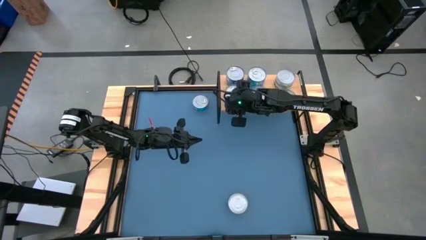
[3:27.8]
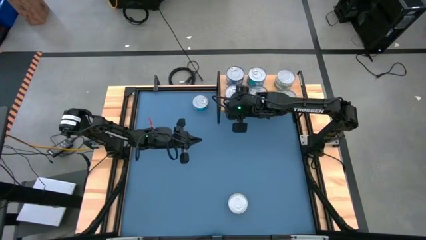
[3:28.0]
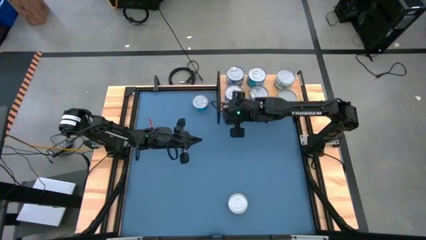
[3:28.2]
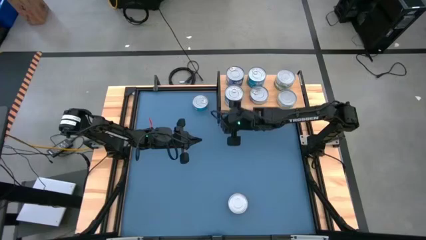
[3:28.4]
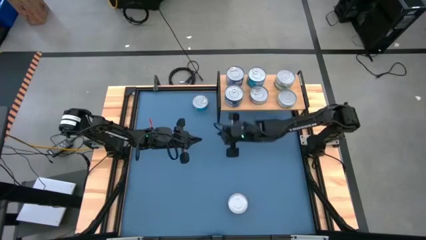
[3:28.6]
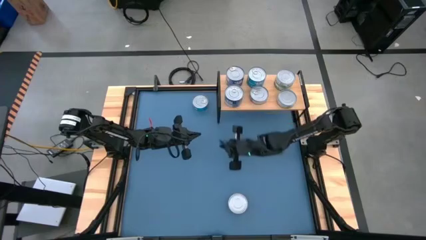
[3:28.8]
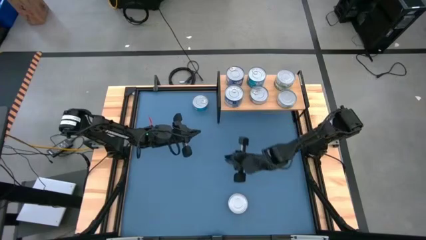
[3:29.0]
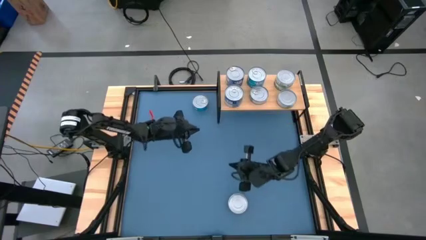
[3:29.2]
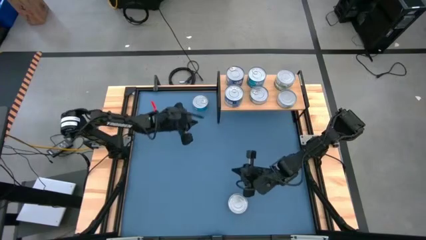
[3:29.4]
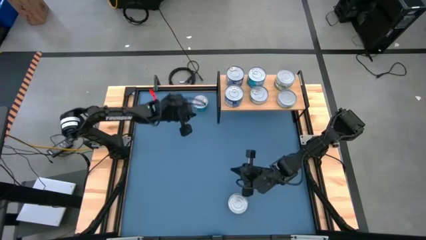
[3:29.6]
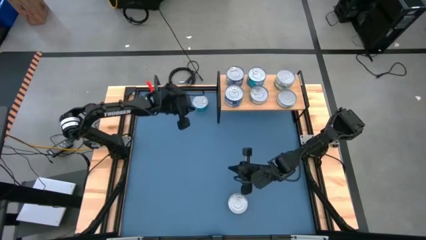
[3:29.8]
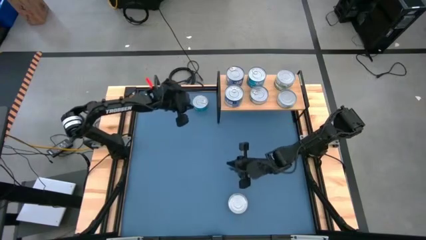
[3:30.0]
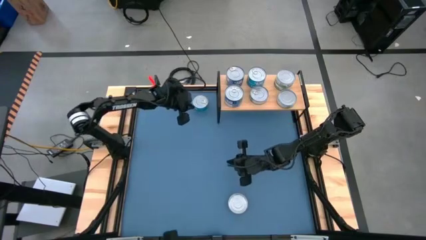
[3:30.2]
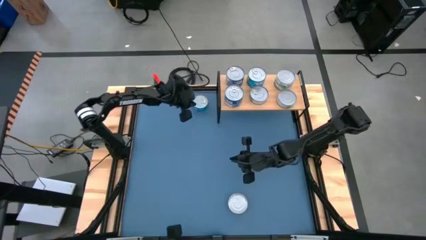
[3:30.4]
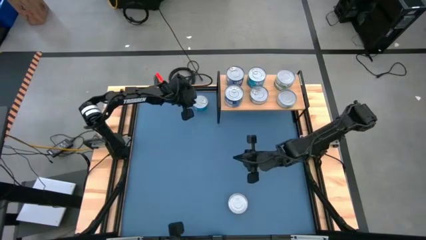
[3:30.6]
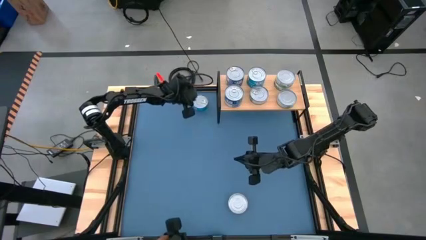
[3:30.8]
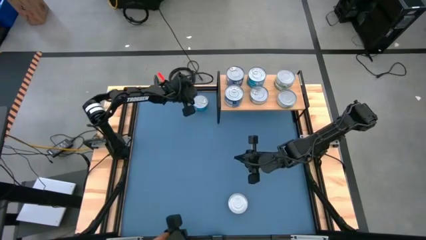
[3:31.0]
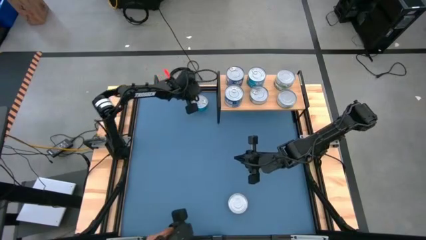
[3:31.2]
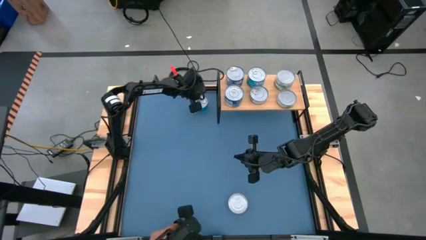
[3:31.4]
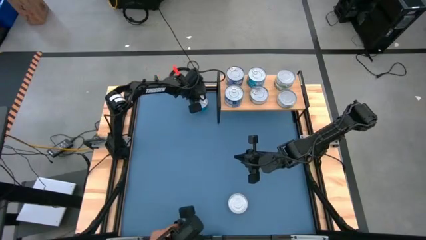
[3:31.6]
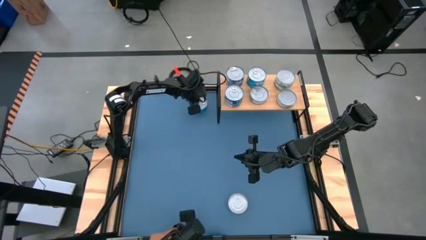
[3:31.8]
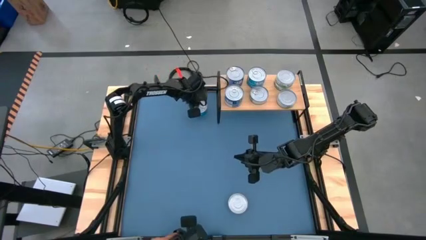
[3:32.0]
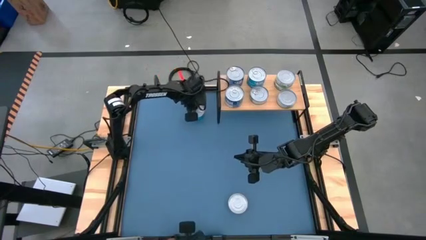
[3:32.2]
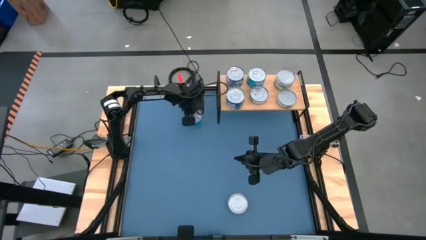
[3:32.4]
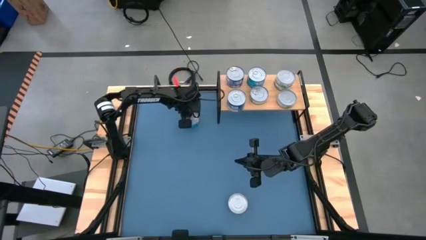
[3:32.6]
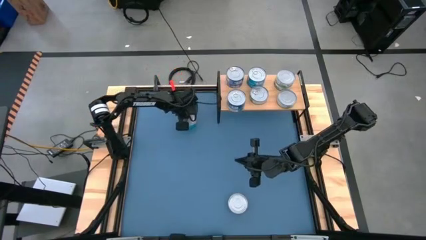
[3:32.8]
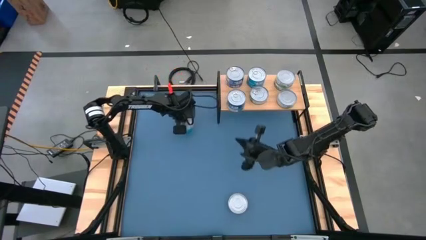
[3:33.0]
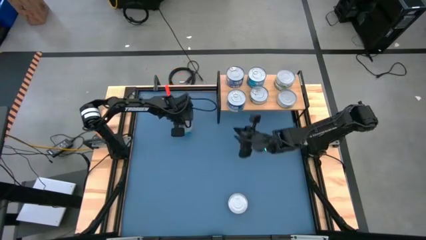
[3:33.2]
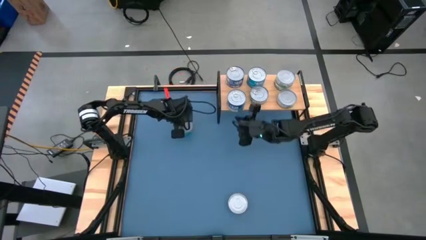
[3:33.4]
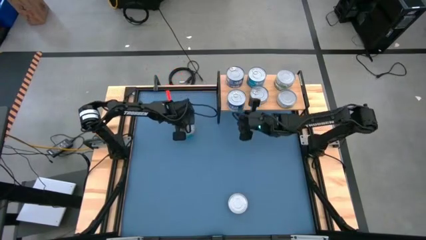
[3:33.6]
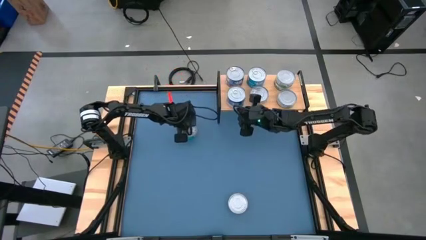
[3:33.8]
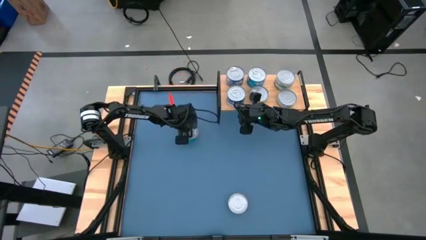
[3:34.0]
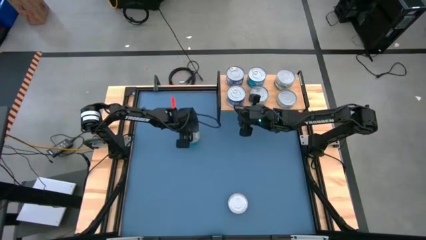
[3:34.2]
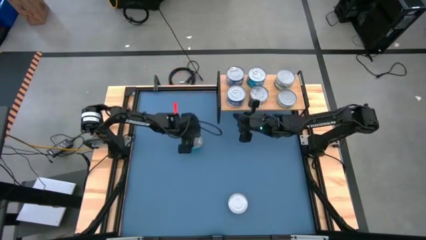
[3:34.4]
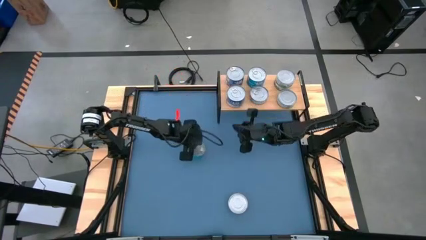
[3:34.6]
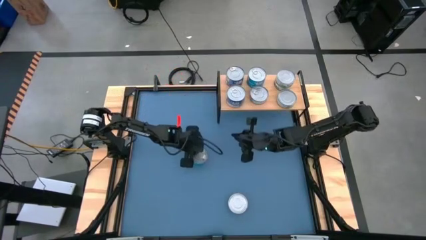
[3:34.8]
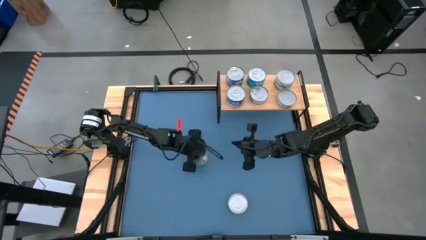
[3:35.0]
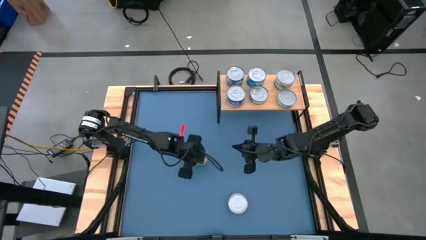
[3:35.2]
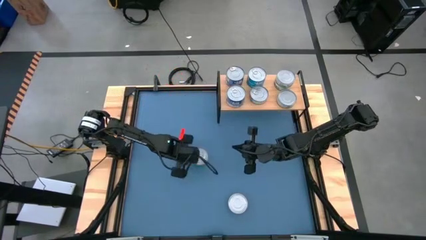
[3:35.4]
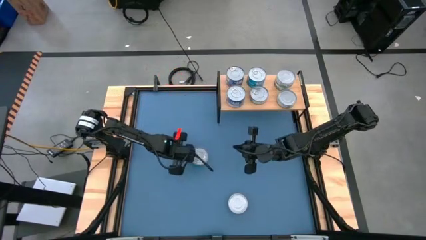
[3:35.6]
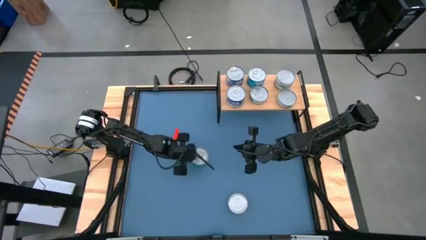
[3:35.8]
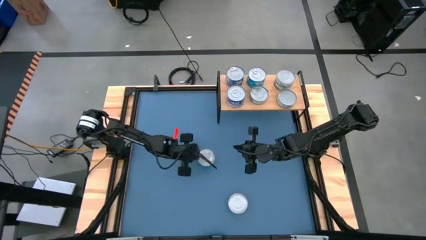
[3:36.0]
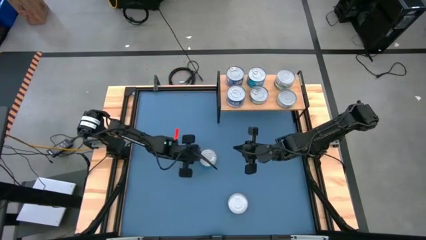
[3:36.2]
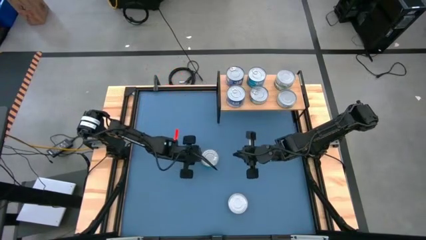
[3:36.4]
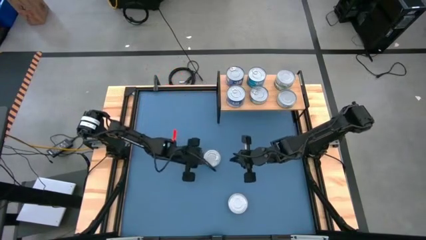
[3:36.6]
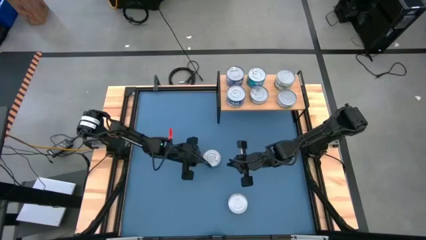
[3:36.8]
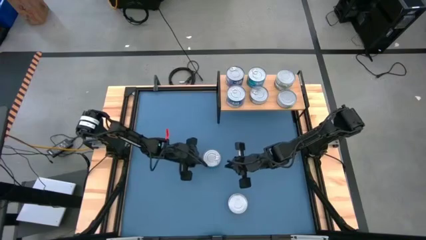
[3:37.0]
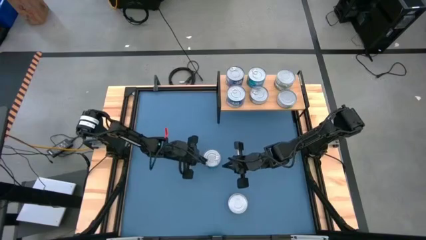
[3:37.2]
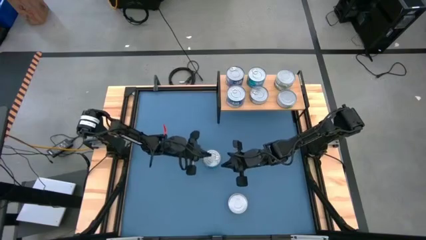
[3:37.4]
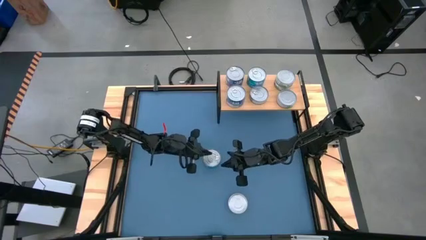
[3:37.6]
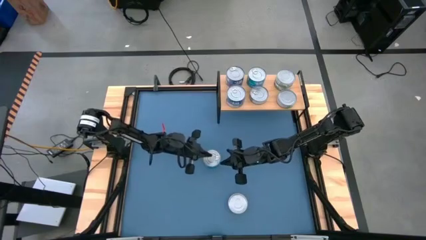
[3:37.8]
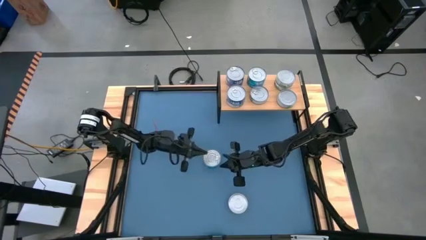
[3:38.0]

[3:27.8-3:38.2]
Task: Stack canned seafood by type on shelf
Stack the light blue tuna can on top of the light blue tuna can on the shelf

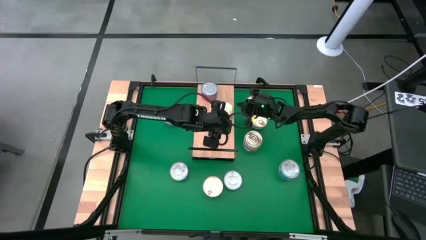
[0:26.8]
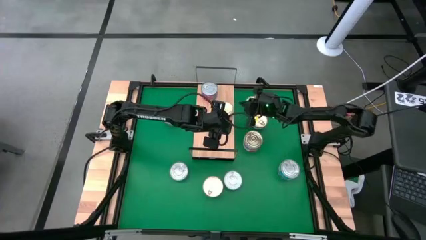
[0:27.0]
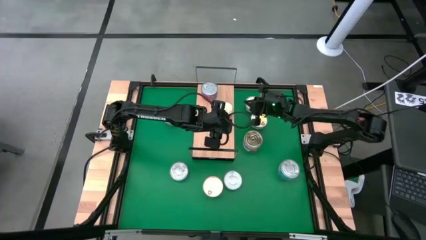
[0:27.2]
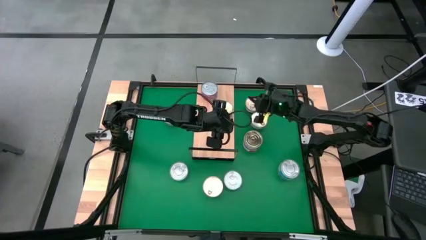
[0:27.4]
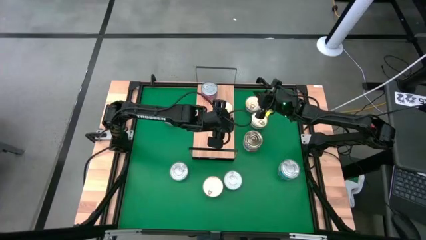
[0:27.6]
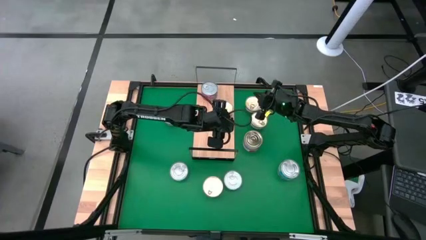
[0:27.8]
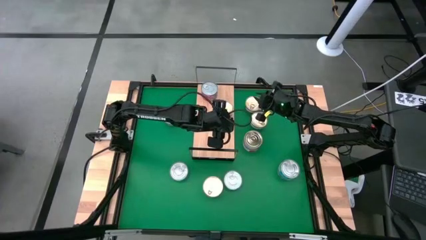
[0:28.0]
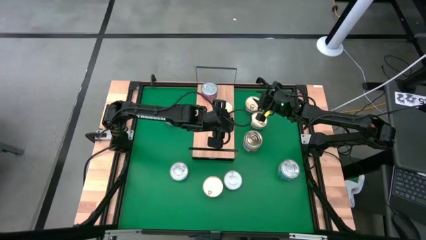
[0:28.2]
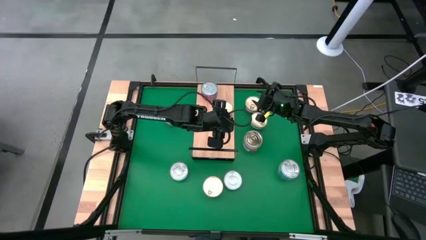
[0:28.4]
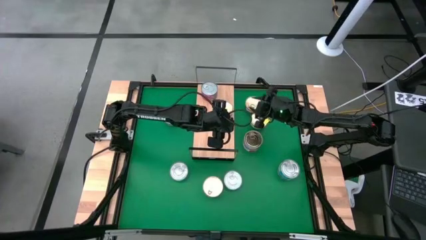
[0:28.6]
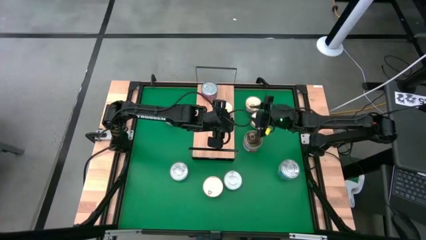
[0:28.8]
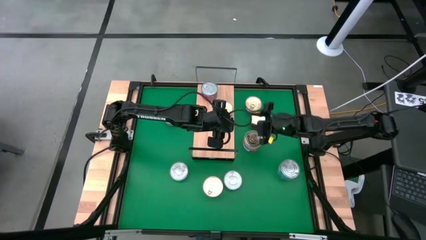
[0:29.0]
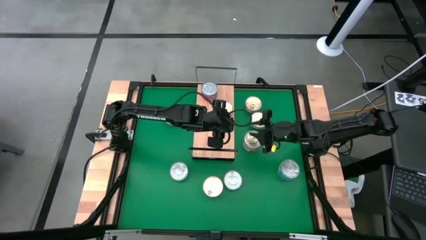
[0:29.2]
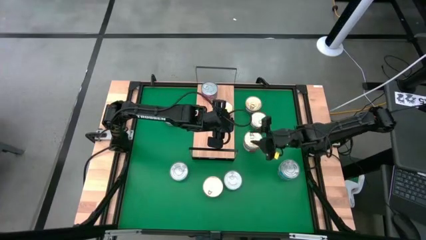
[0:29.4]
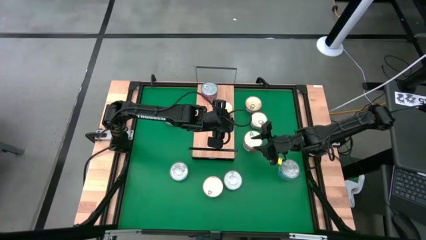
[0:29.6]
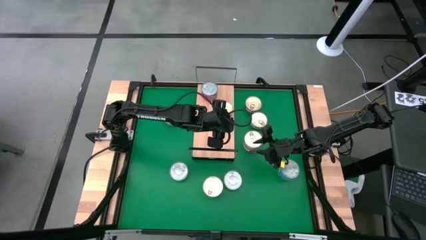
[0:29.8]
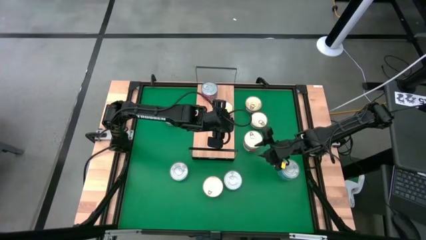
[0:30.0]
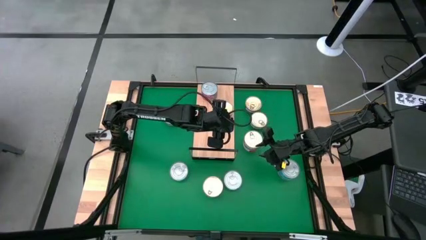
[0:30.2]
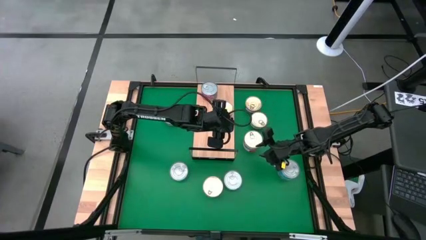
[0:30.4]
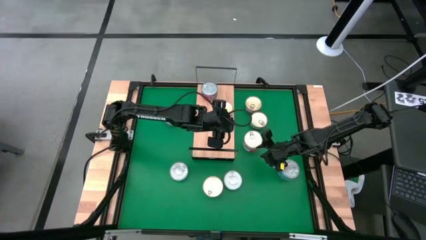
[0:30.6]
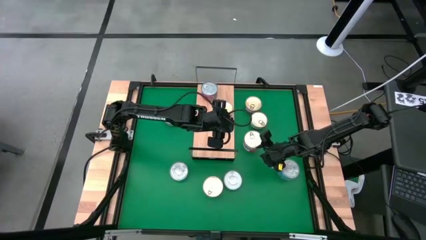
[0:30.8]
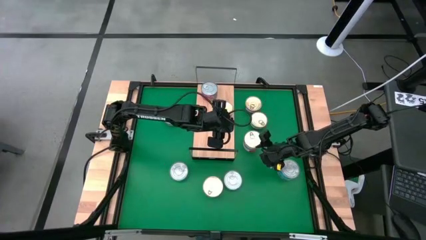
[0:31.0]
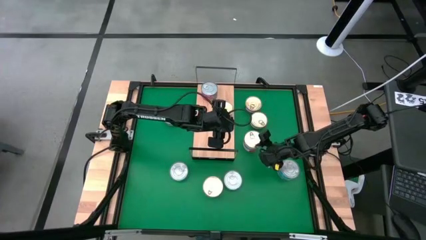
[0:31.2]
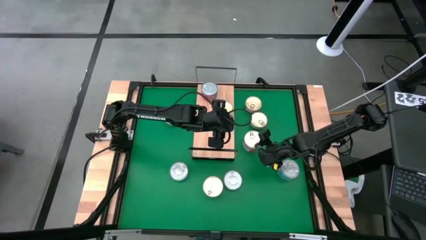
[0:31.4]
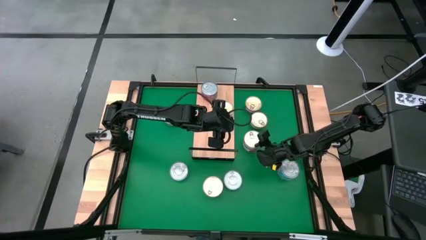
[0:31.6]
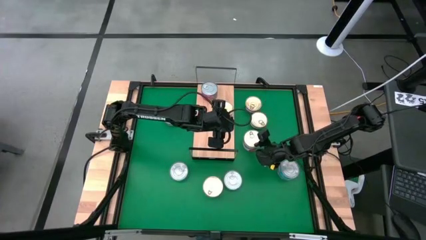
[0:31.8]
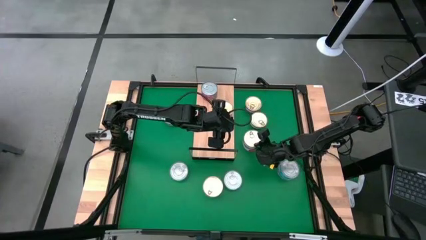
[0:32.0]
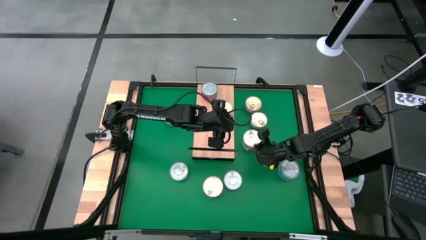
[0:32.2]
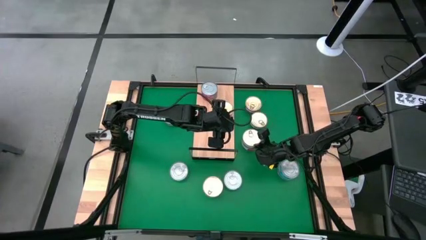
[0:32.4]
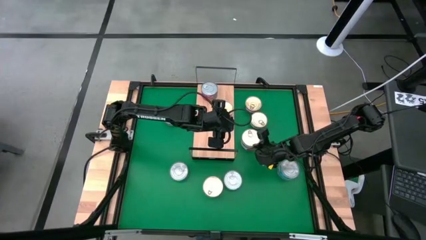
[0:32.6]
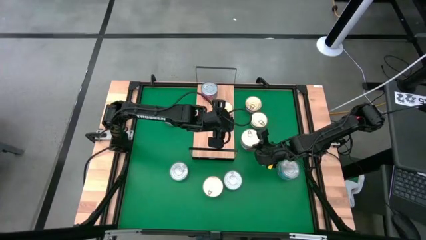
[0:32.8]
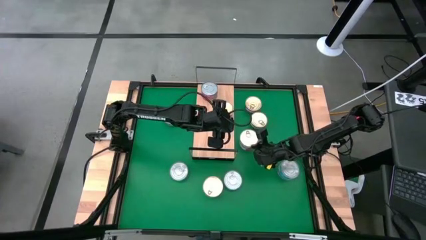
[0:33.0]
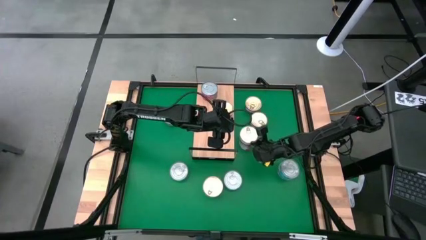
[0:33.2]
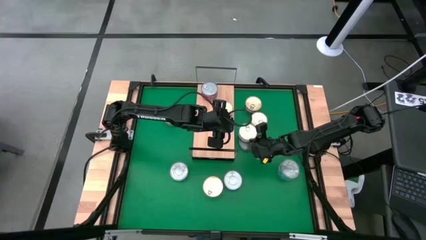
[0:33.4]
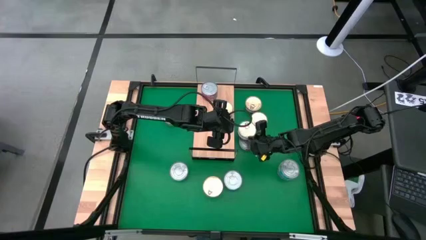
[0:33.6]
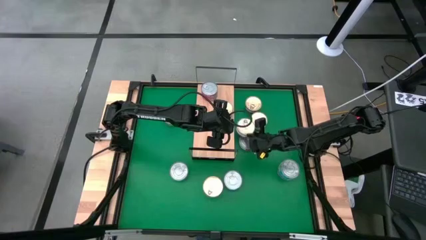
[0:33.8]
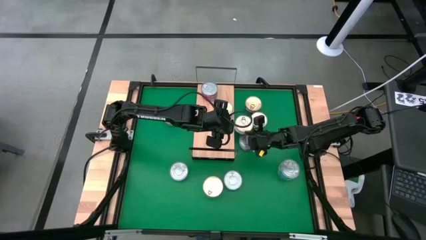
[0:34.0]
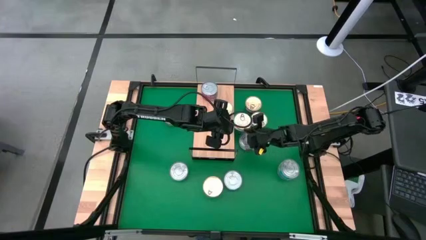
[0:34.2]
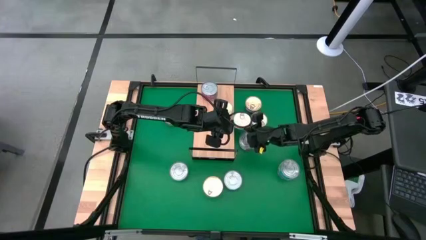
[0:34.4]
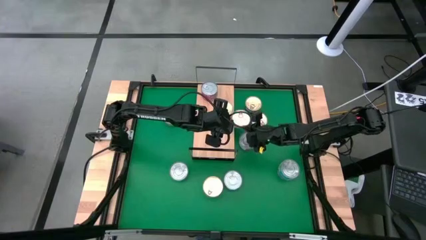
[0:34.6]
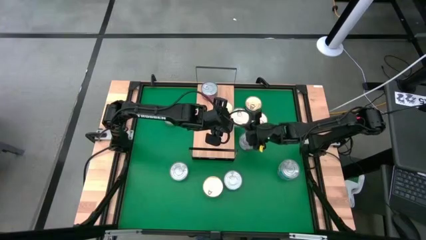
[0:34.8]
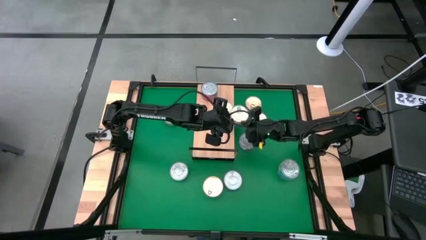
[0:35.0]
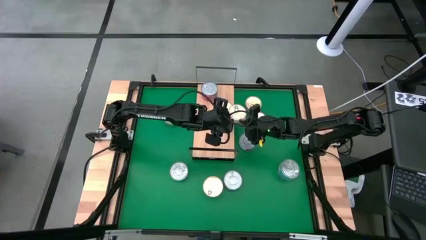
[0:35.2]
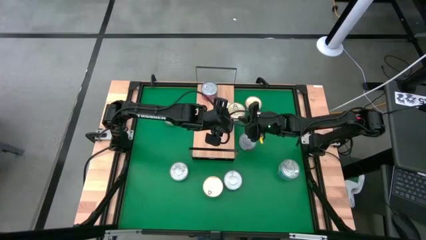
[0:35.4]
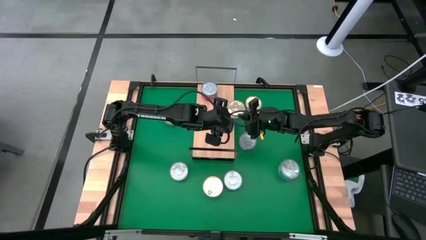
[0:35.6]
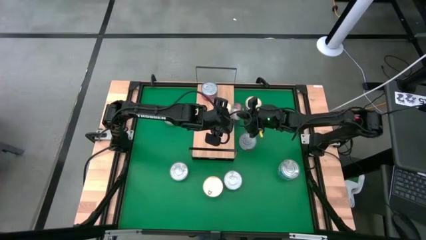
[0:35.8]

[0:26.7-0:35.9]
Task: Stack canned seafood by type on shelf
Stack the dark blue tuna can on top of the dark blue tuna can on the shelf
